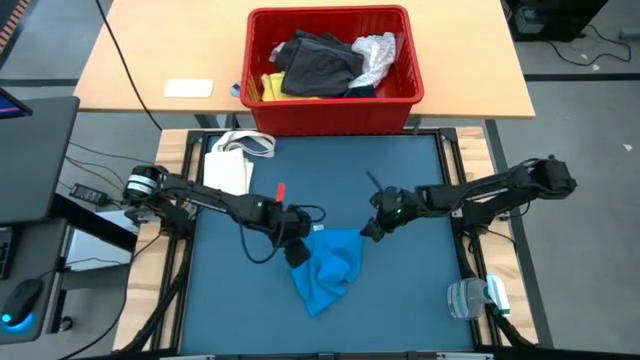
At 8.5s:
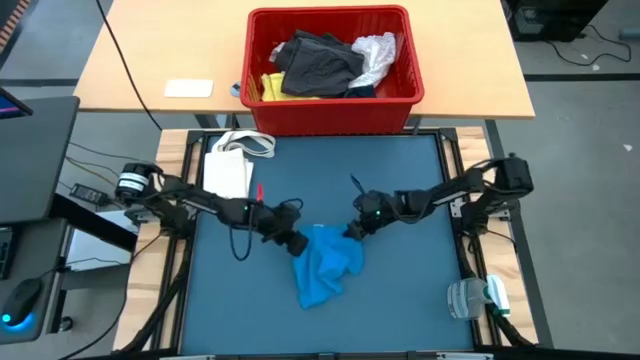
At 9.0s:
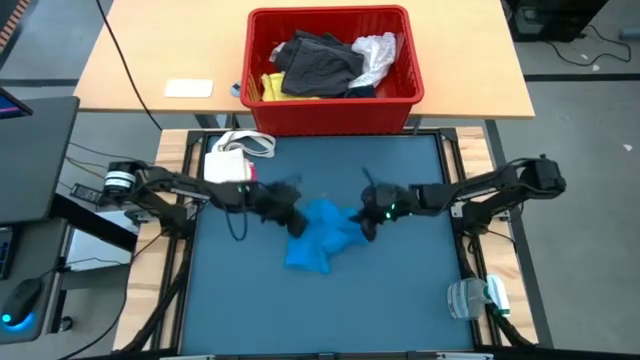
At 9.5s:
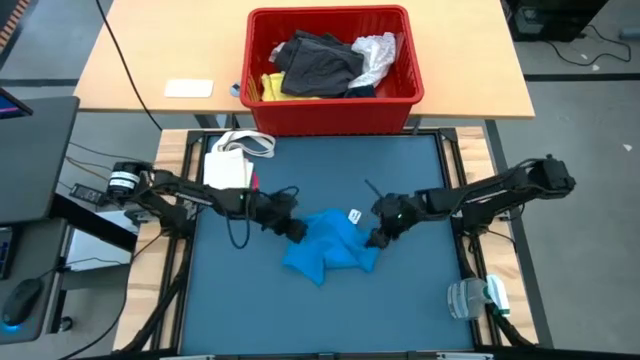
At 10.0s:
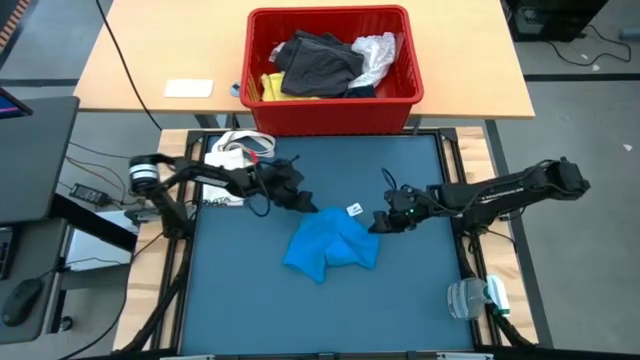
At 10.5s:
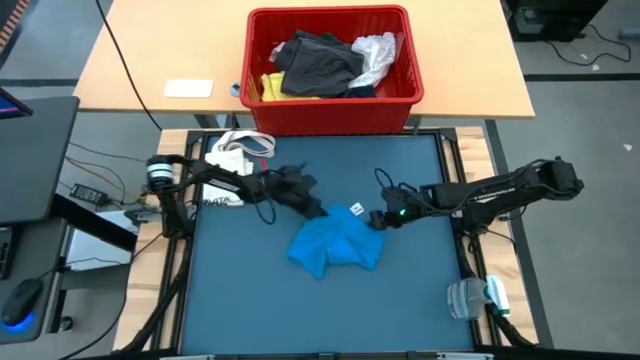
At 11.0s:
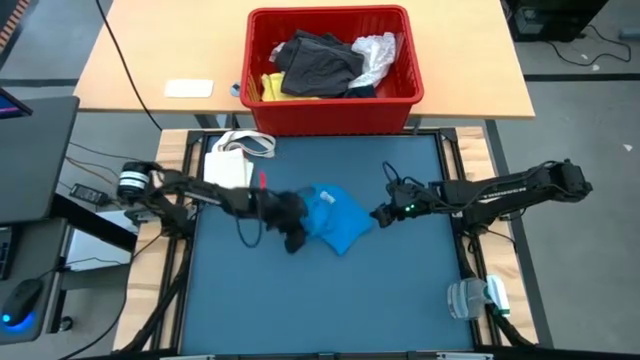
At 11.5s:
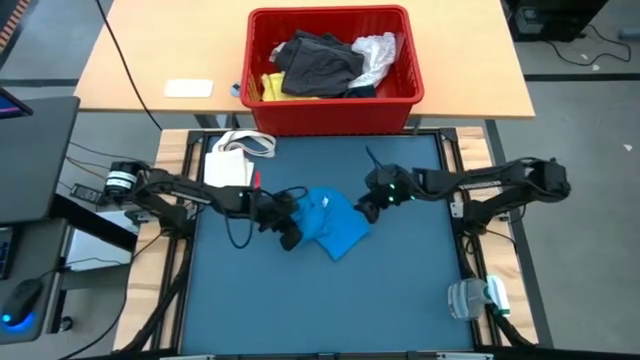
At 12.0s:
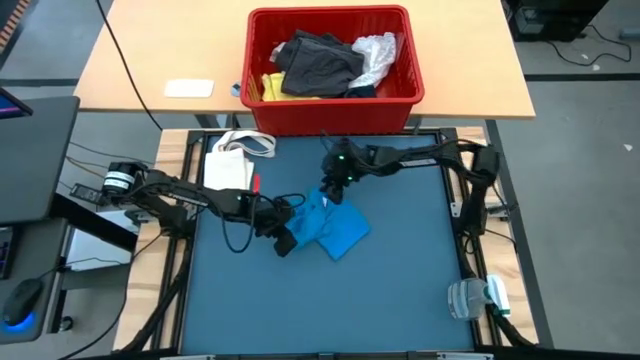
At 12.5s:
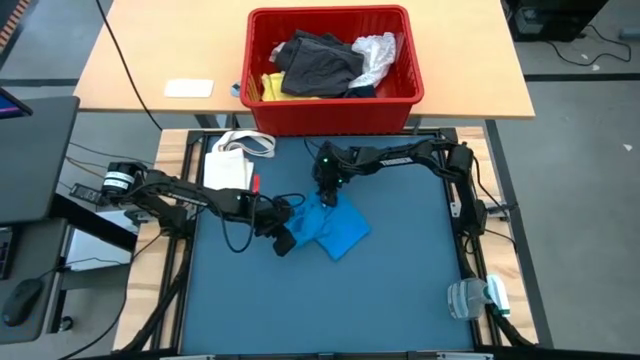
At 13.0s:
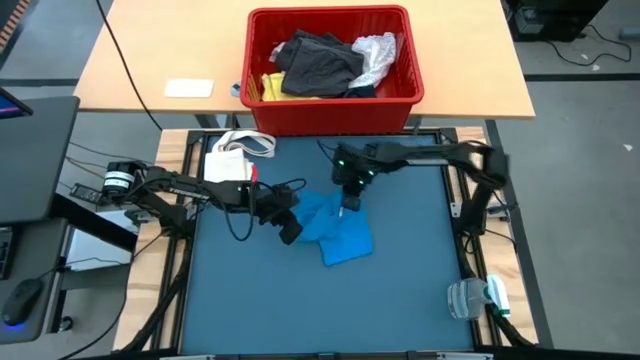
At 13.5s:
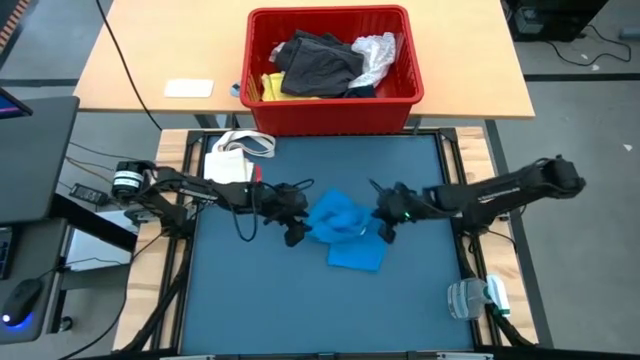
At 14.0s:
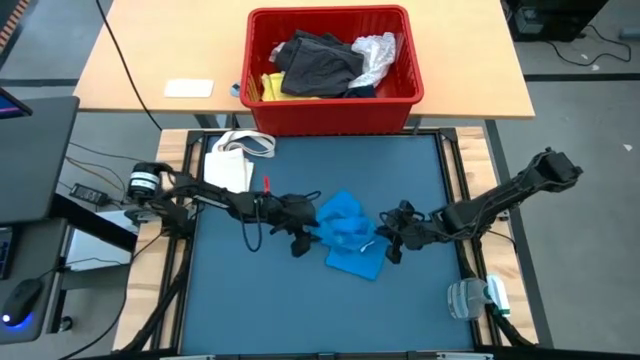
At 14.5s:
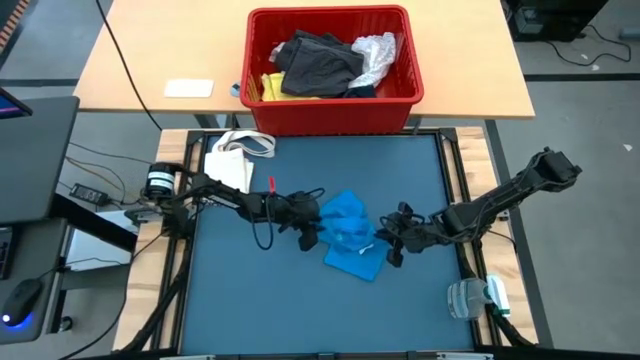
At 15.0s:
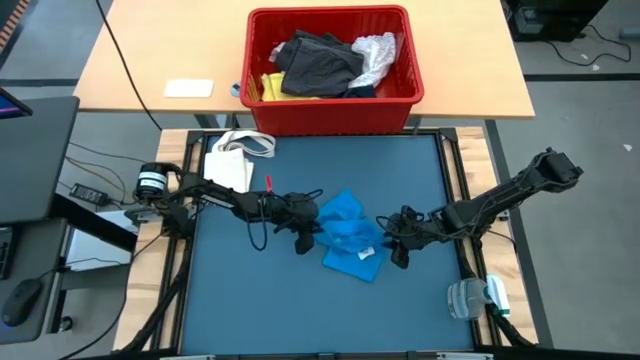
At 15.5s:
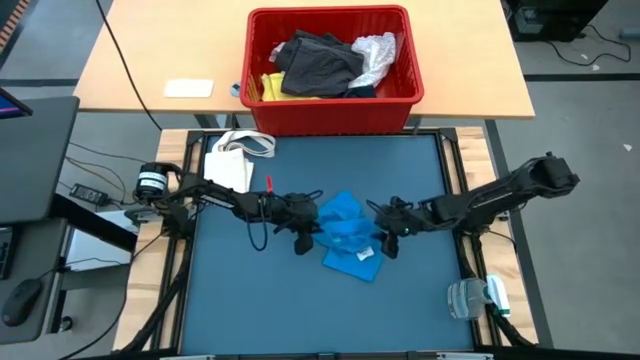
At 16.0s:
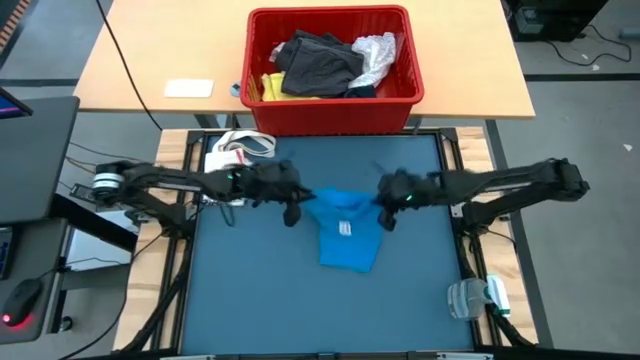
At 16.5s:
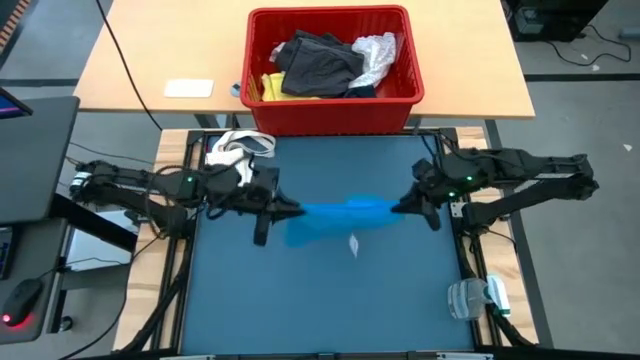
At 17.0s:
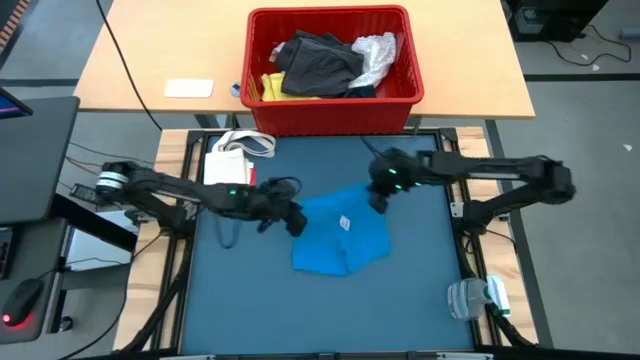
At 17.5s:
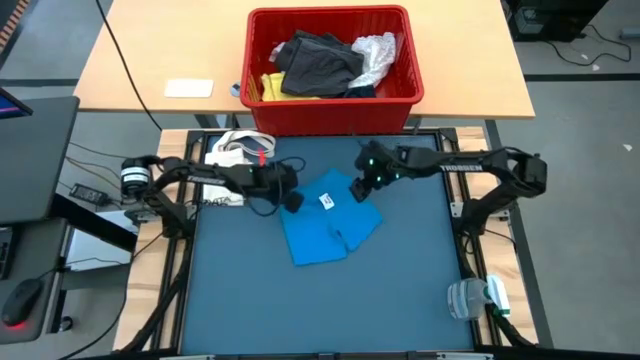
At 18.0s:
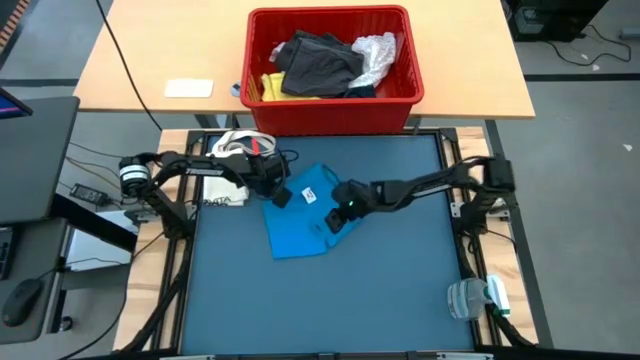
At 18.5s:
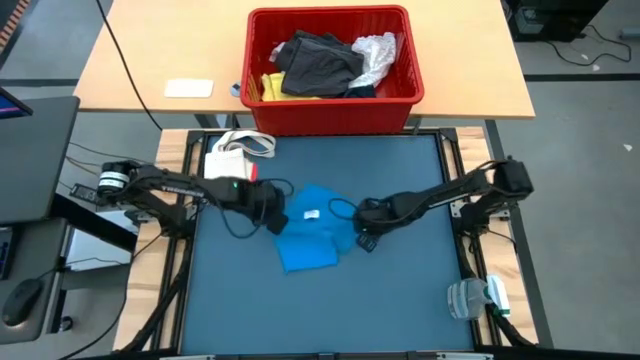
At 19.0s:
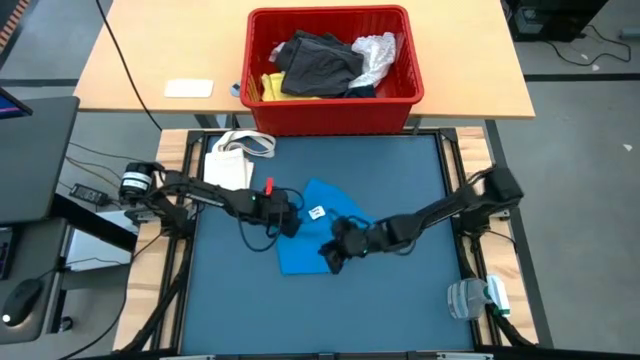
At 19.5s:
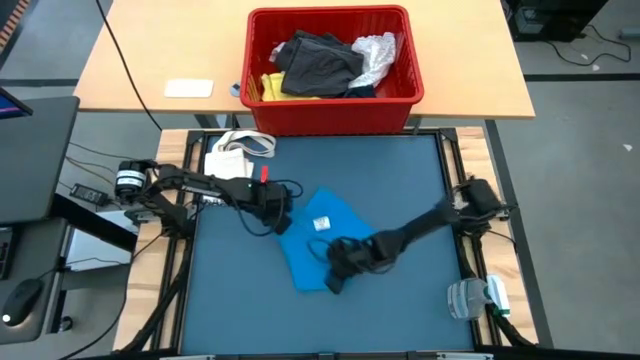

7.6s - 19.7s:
Task: Fold laundry
Fold the blue shorts

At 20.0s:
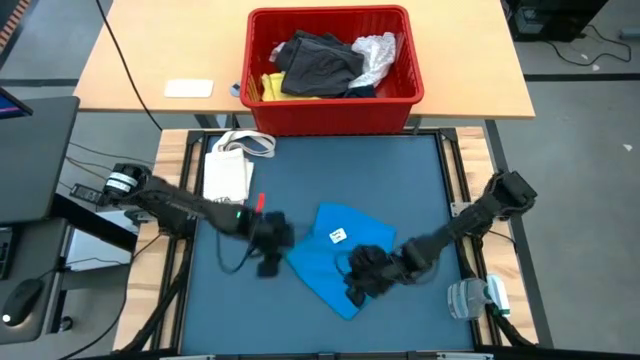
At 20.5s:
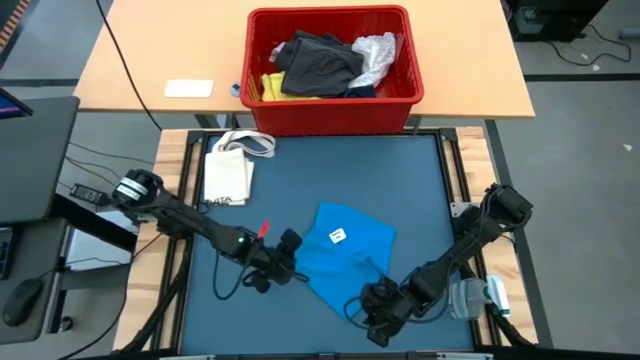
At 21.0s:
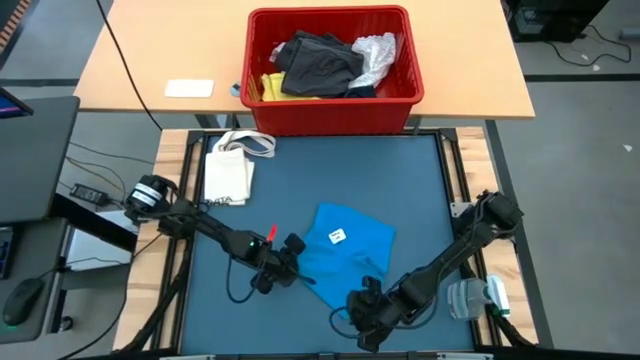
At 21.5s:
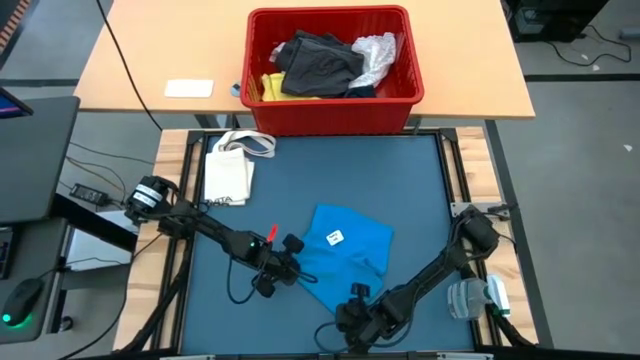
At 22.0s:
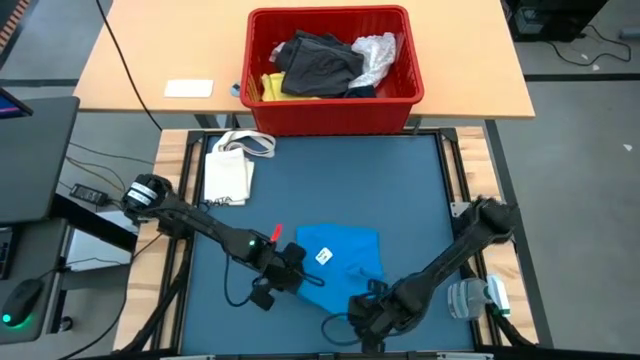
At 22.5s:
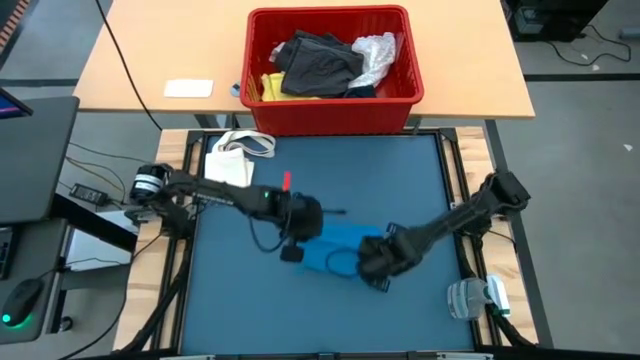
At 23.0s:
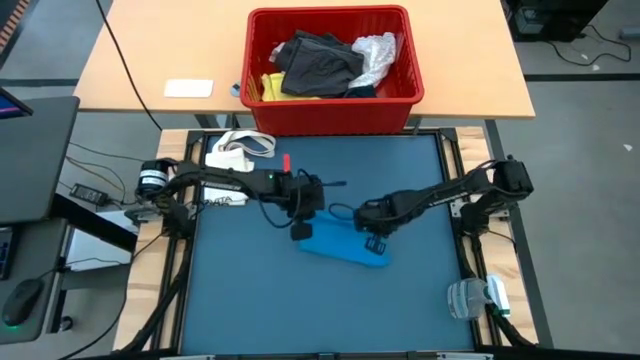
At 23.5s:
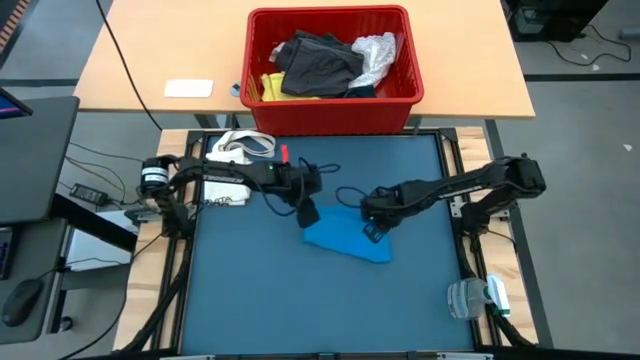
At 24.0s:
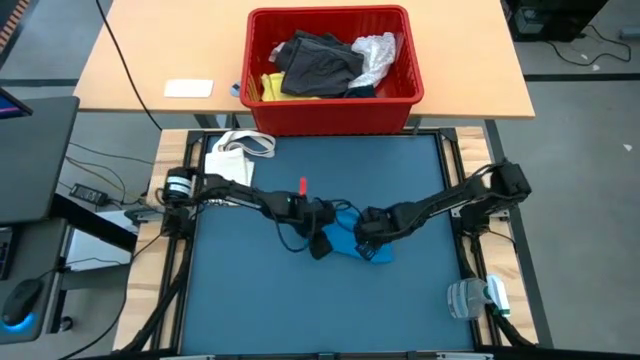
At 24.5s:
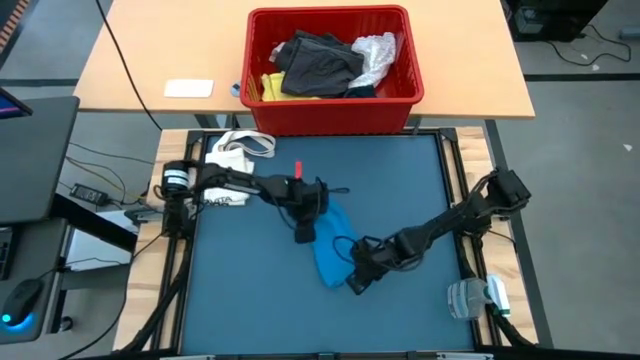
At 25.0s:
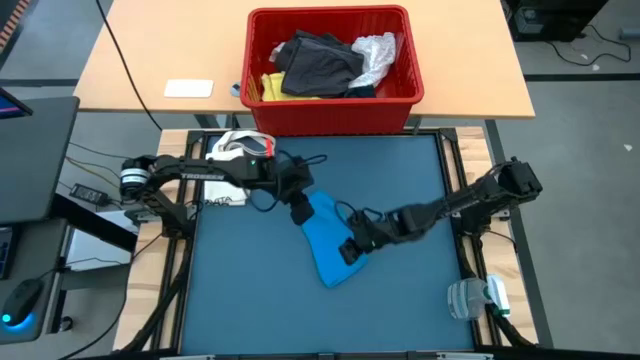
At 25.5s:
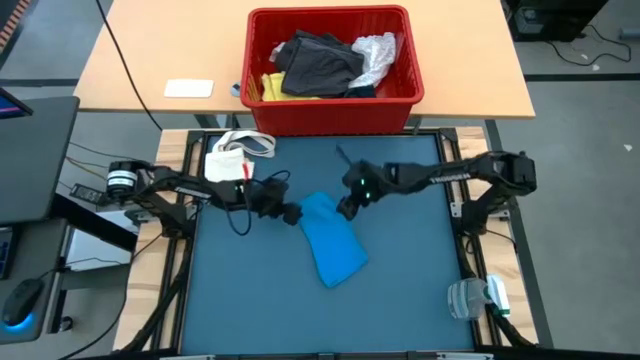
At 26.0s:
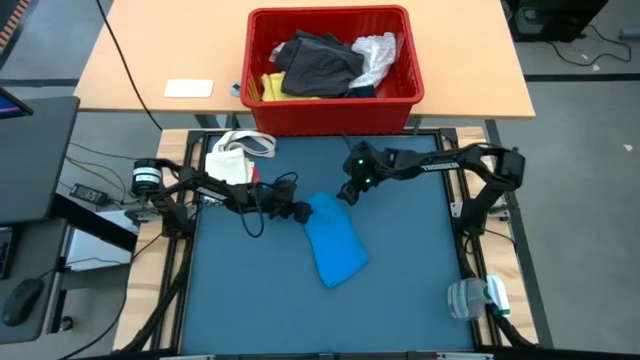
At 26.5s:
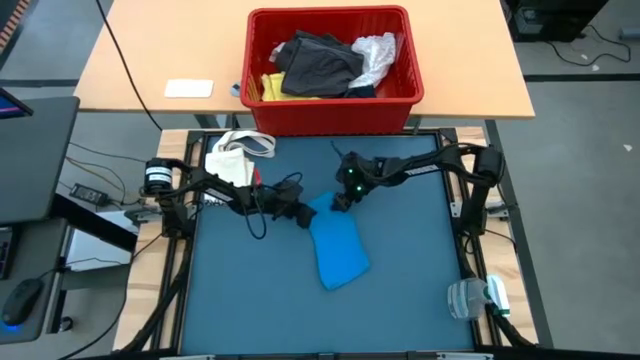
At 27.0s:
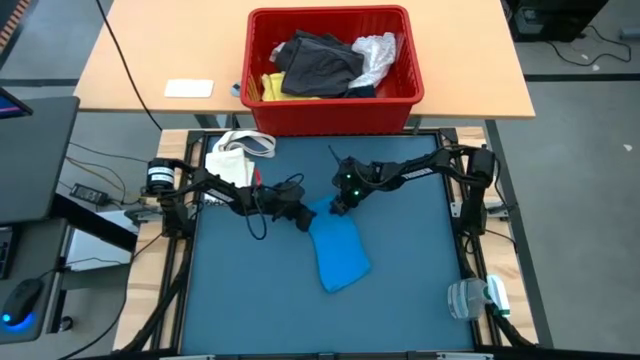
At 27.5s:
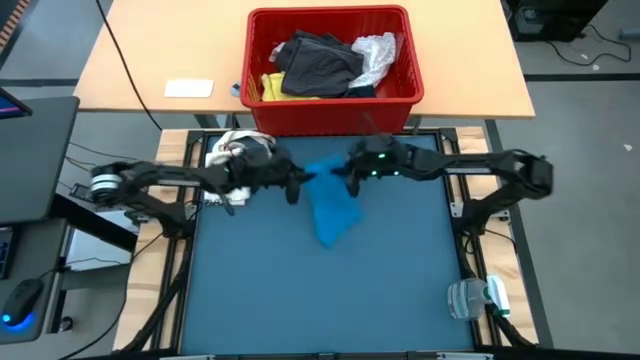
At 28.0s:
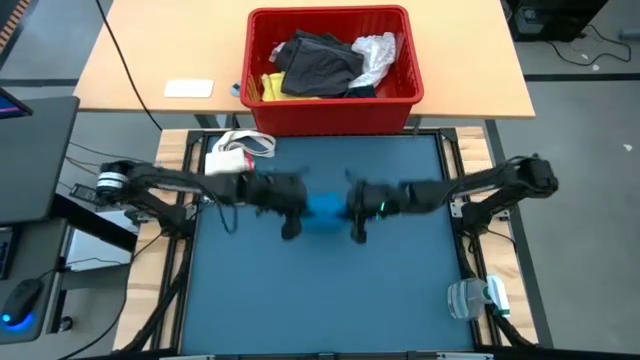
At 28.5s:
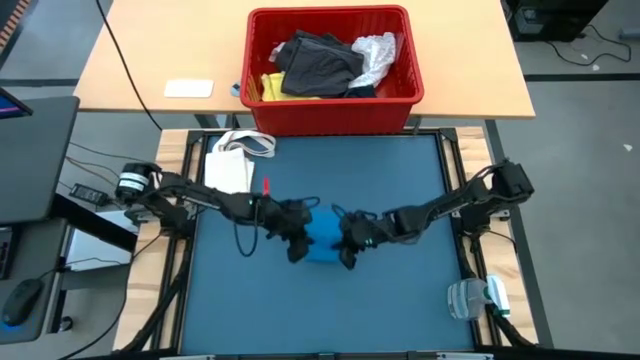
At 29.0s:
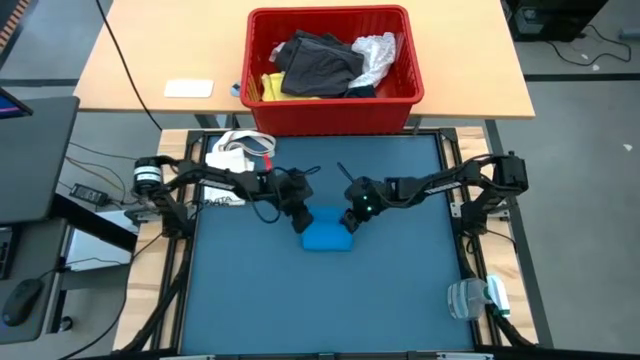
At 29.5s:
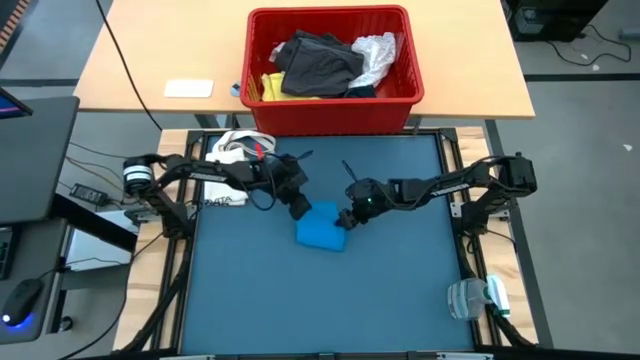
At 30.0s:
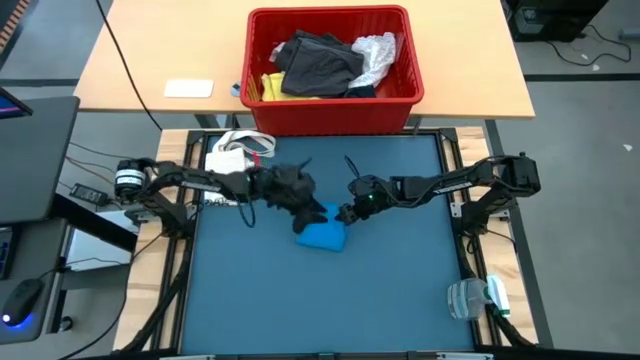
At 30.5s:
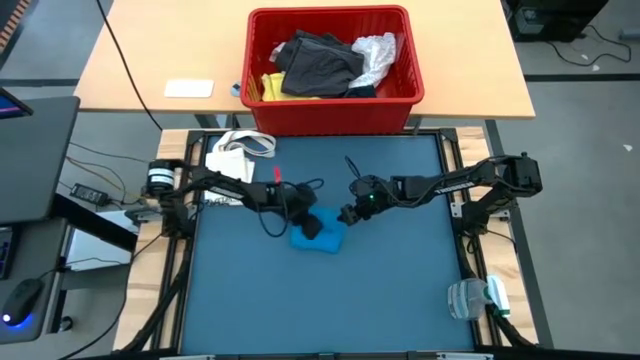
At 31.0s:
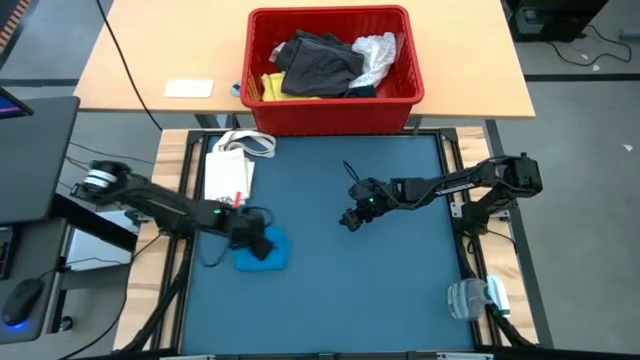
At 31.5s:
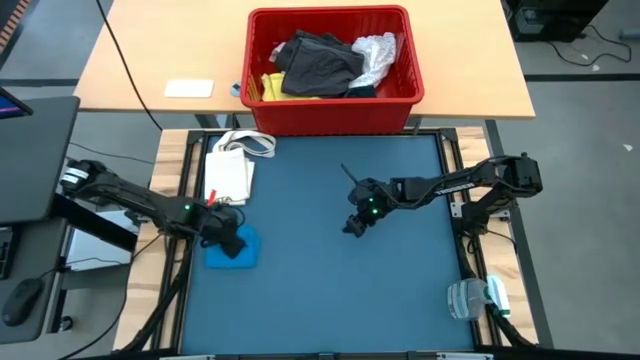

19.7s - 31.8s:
Fold the blue shorts
